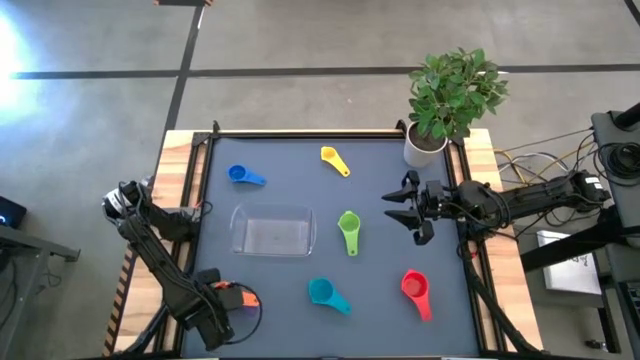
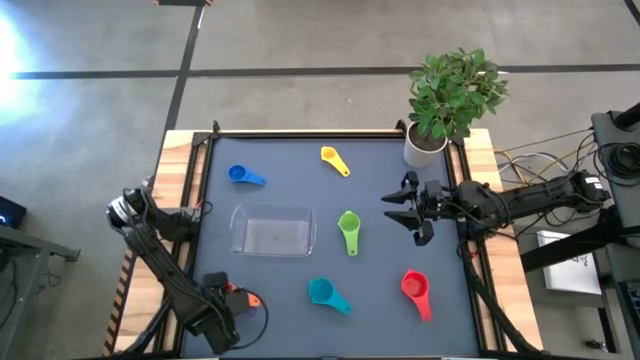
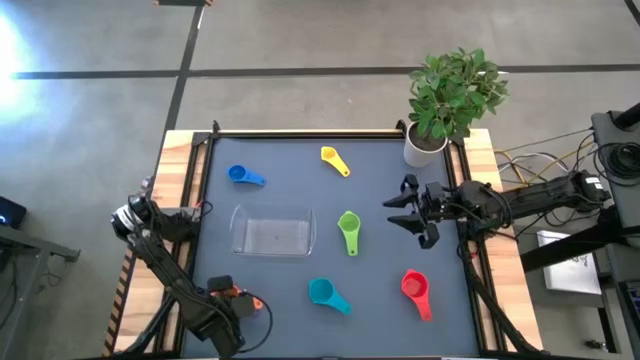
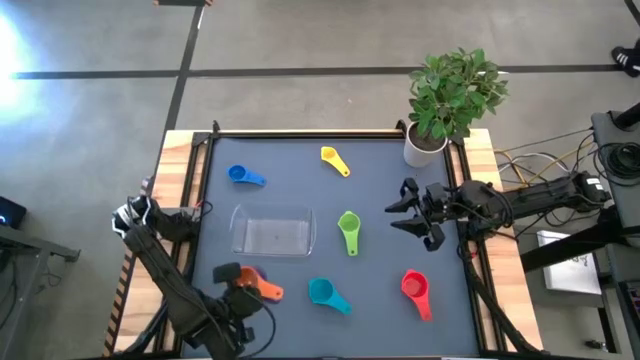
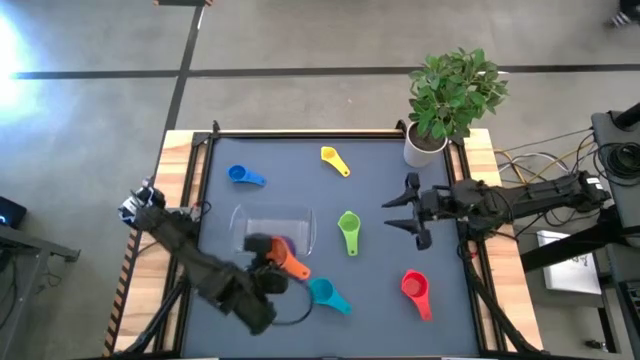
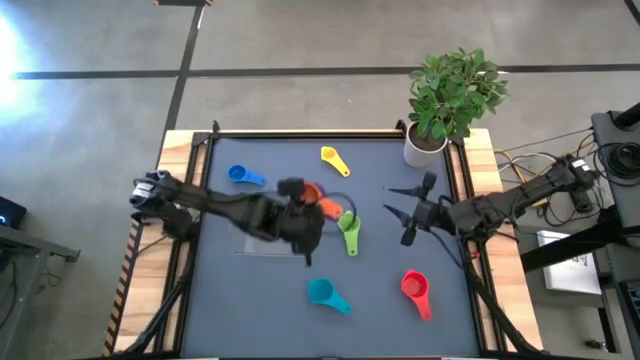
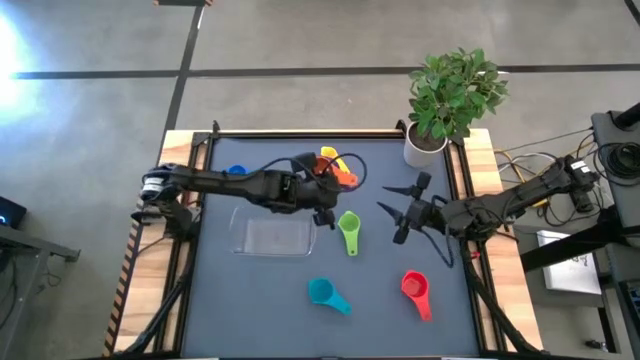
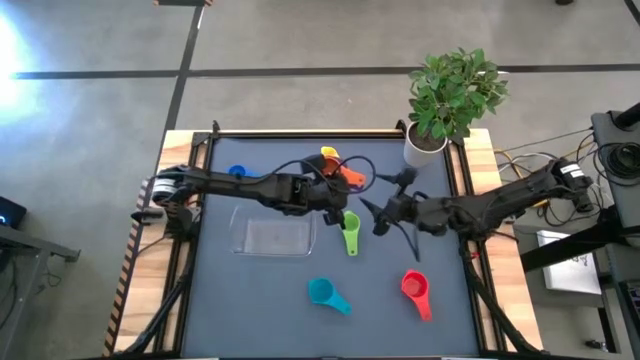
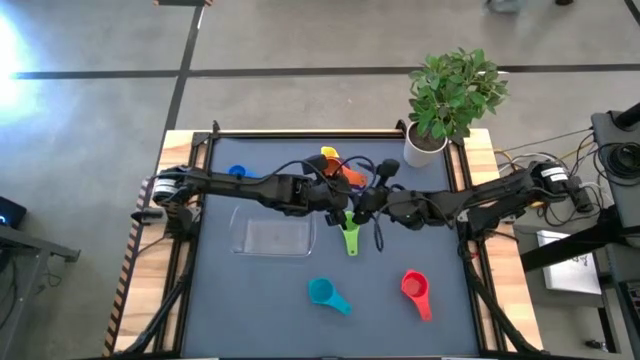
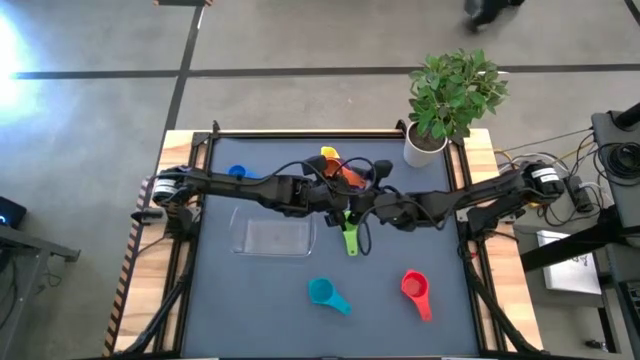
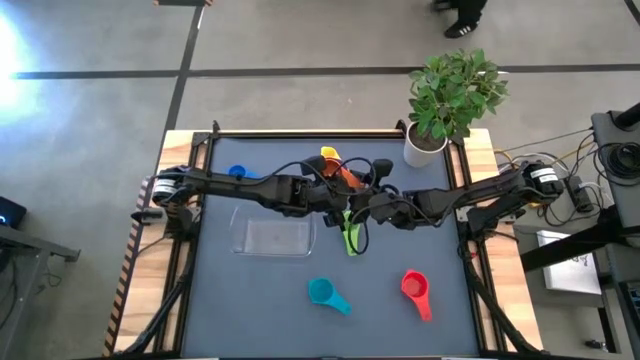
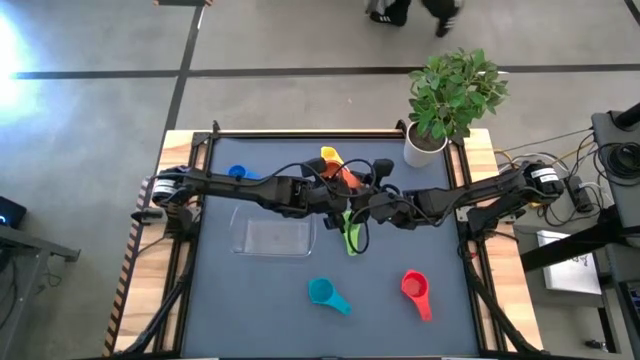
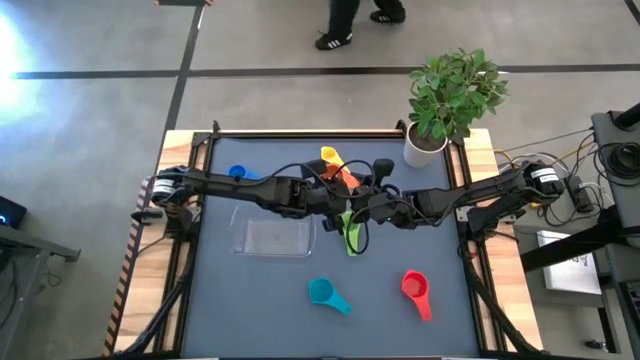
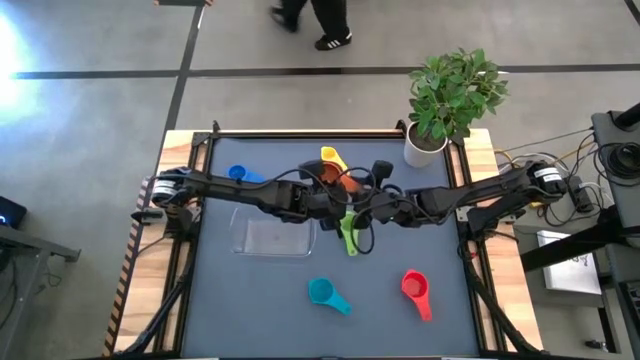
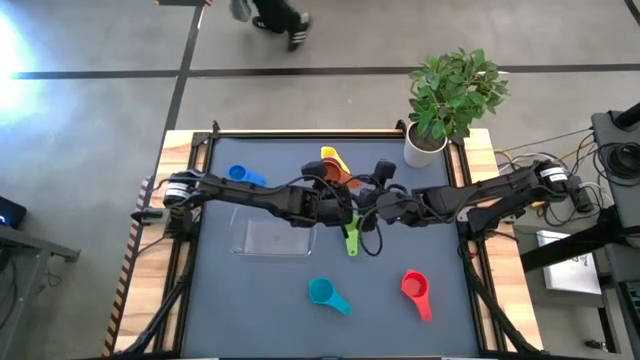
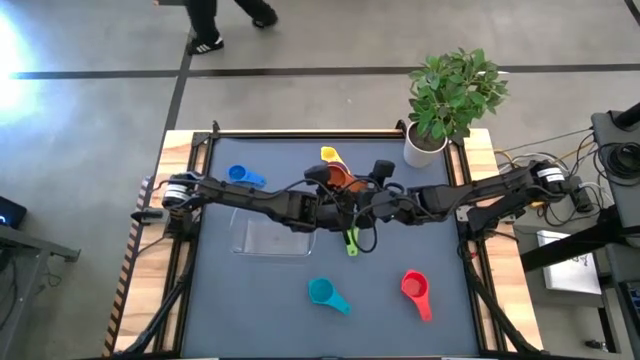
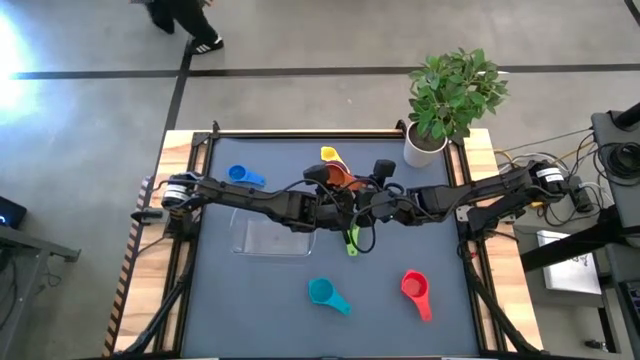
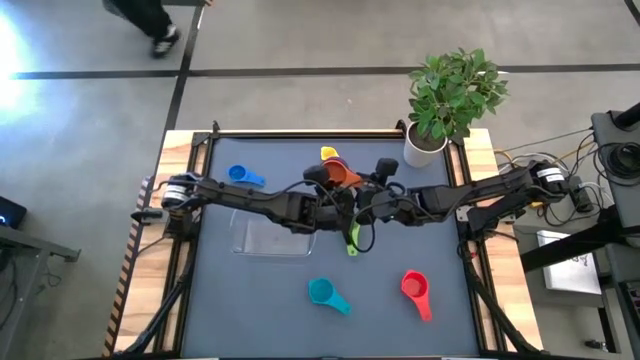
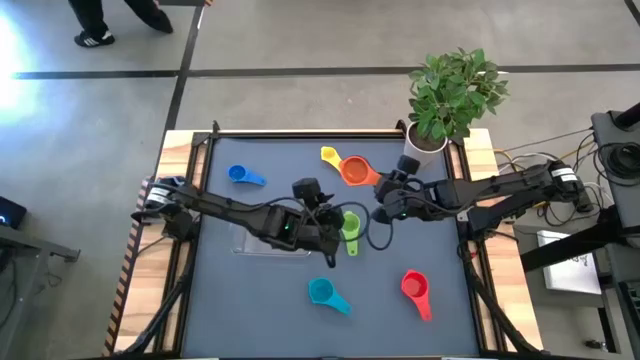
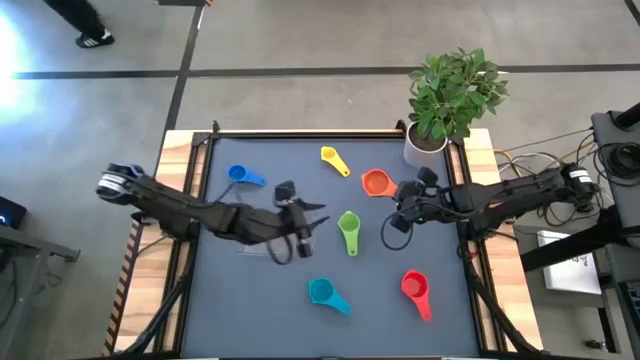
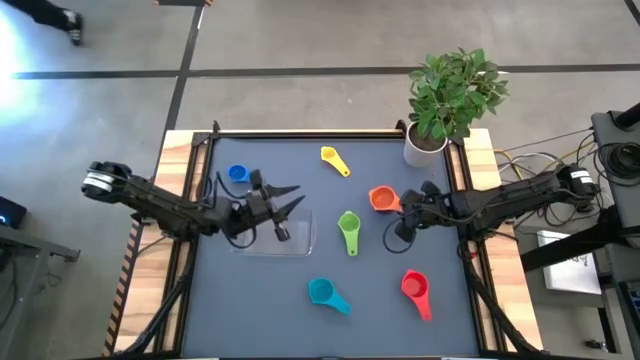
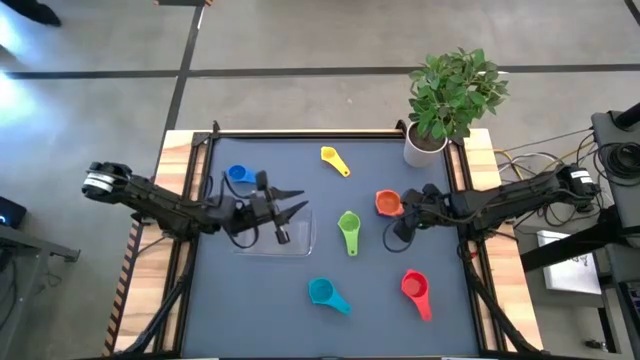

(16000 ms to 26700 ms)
Task: Nest measuring cups in basket
Prepare the stacked measuring cups

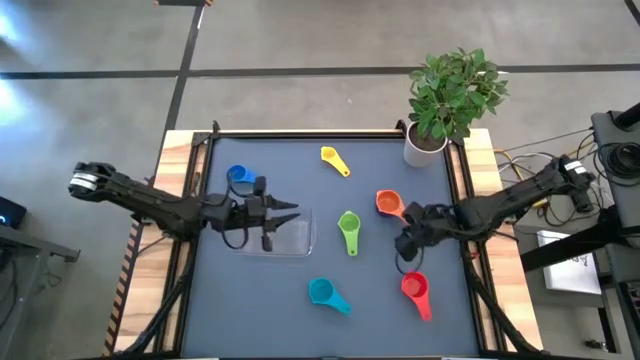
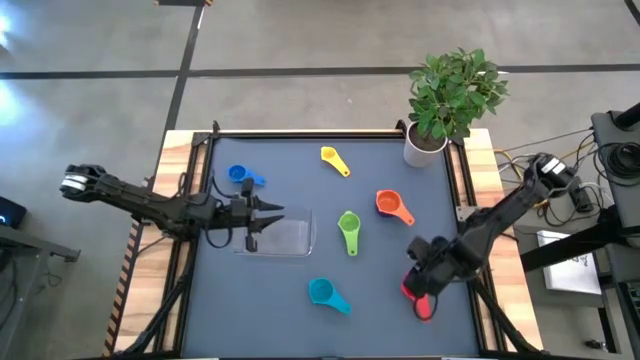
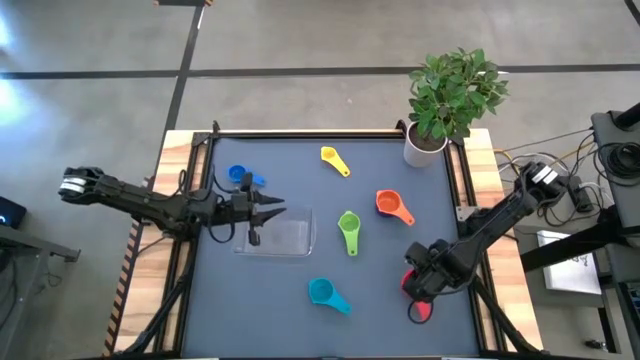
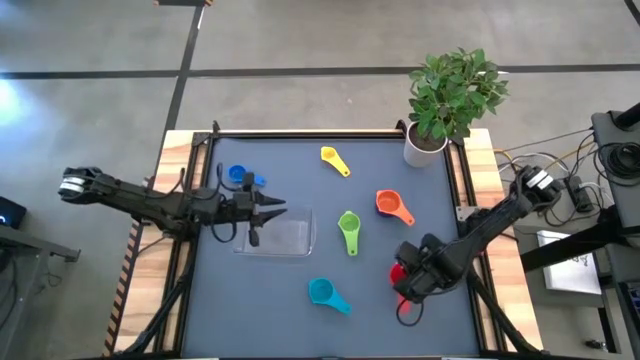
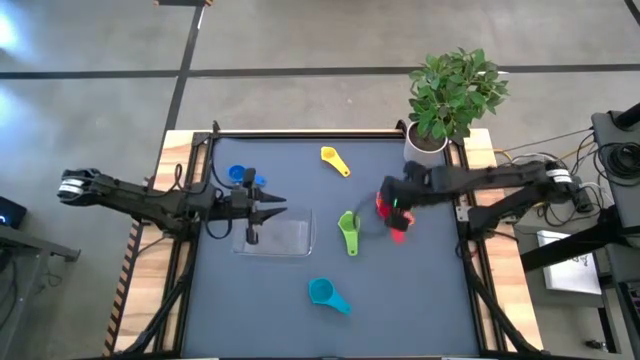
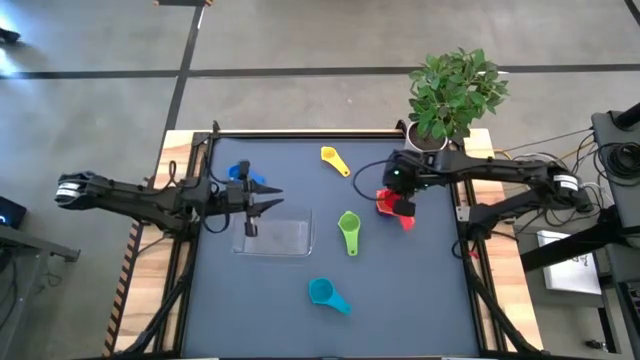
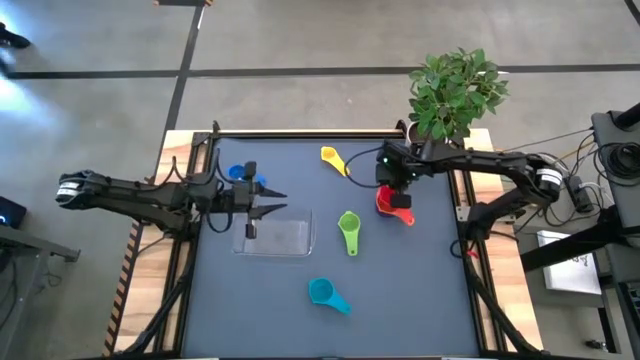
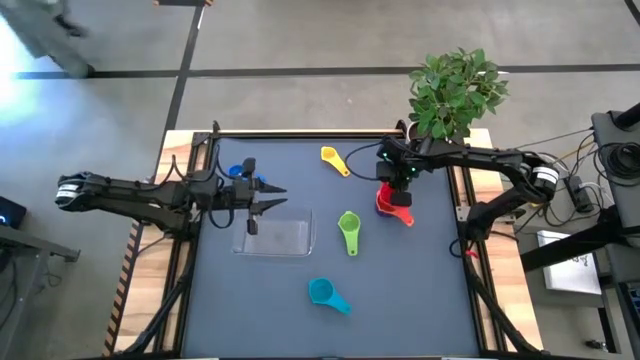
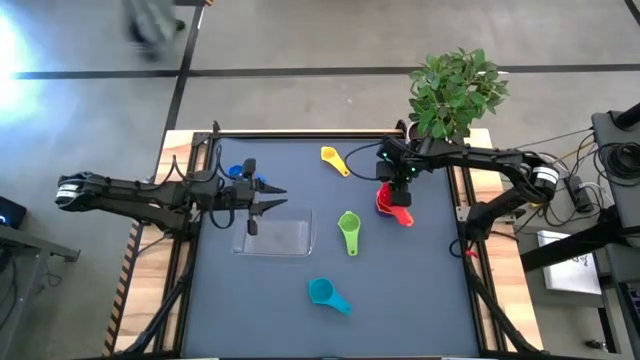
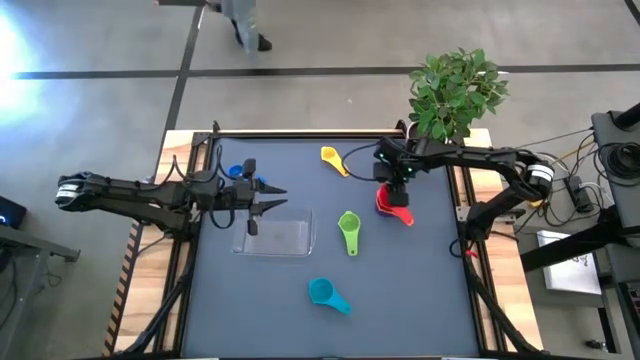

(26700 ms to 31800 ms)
Stack the red measuring cup on the top of the orange measuring cup

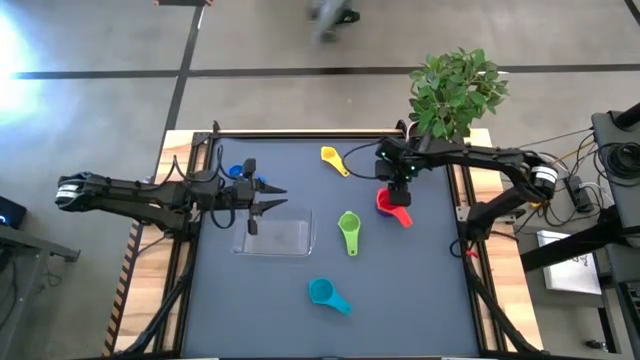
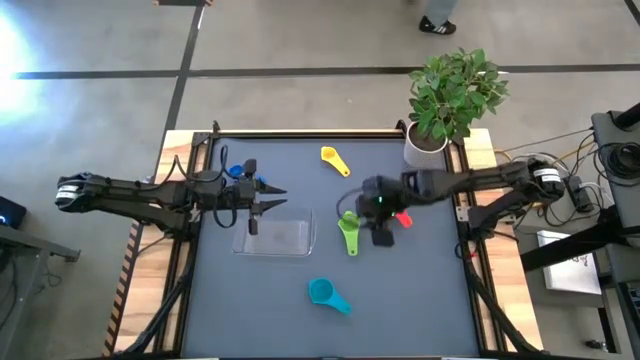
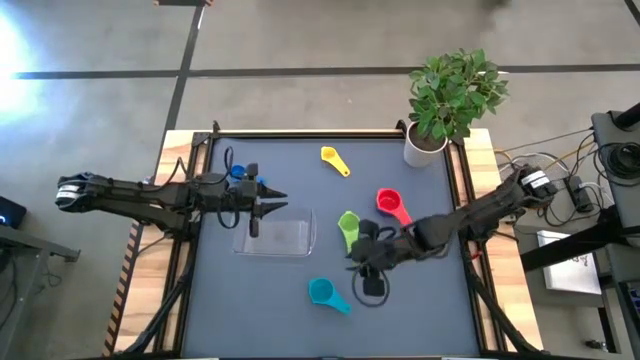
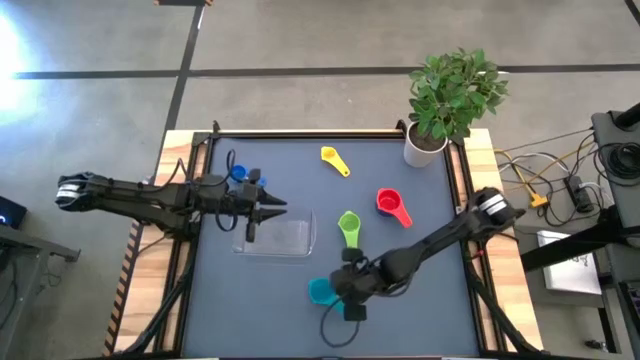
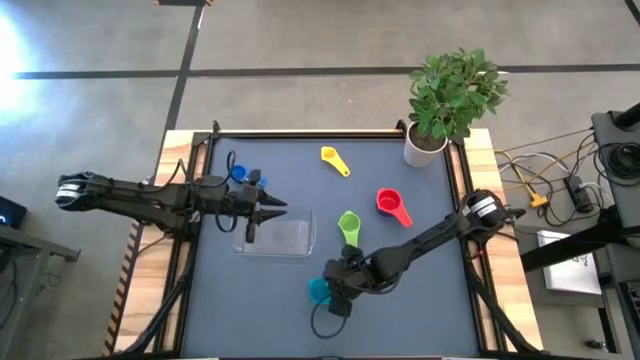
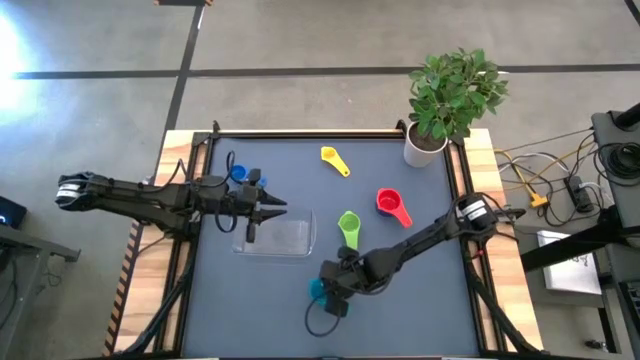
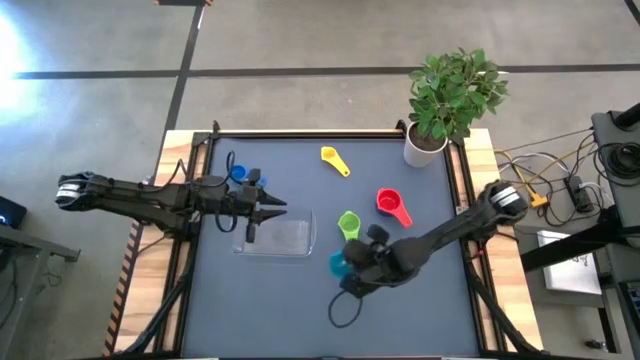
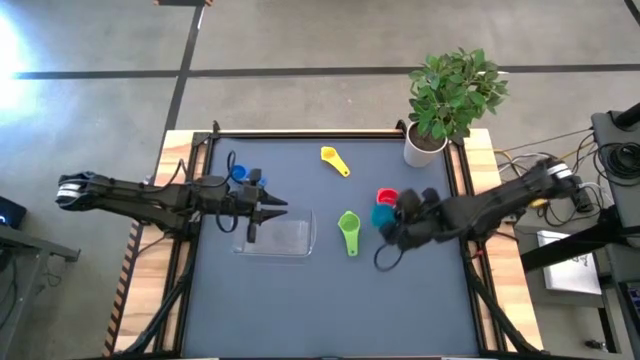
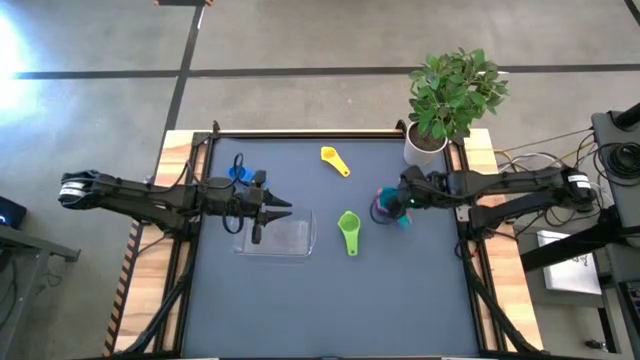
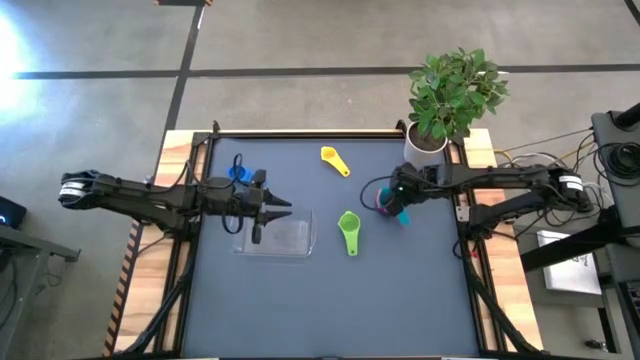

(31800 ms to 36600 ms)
Stack the light blue measuring cup on the top of the red measuring cup

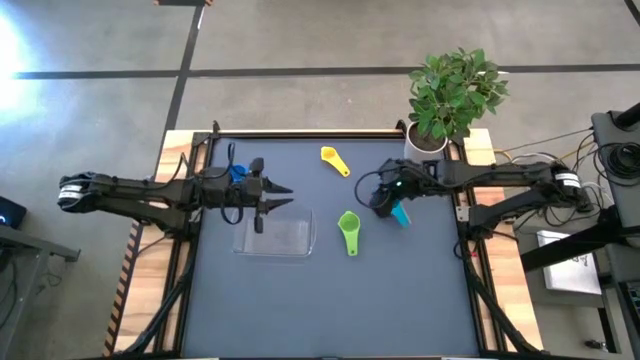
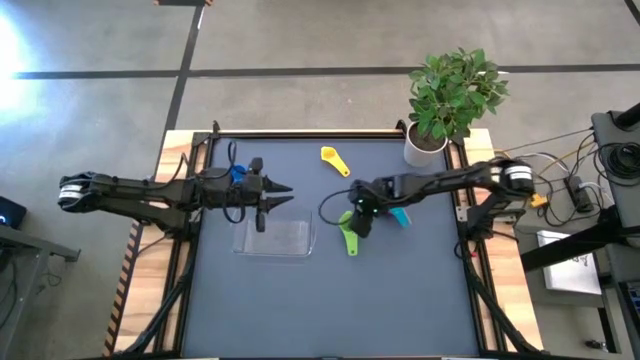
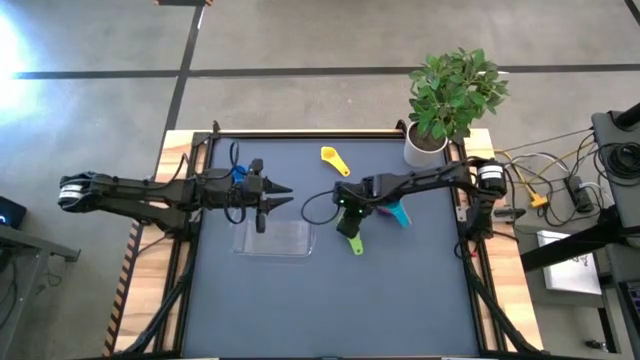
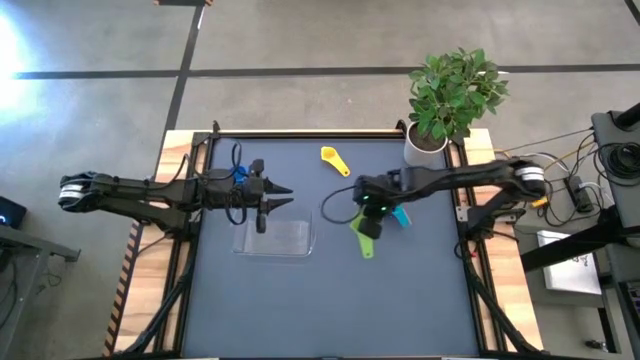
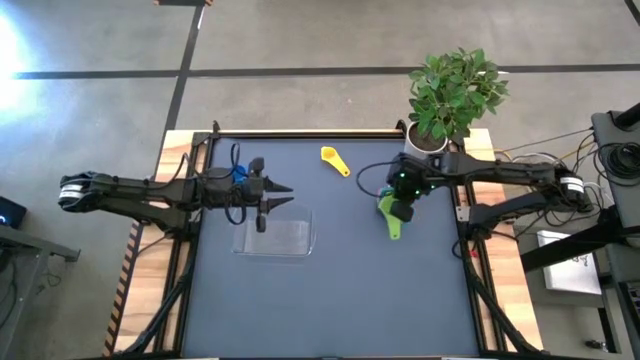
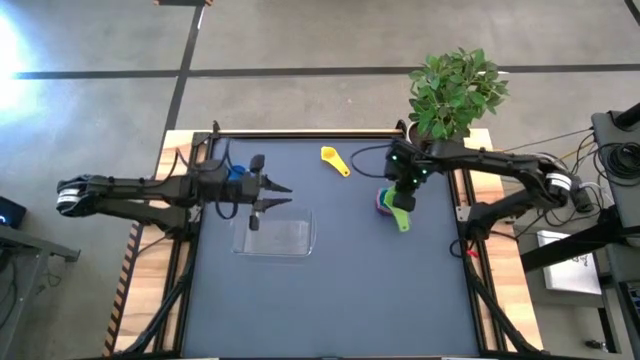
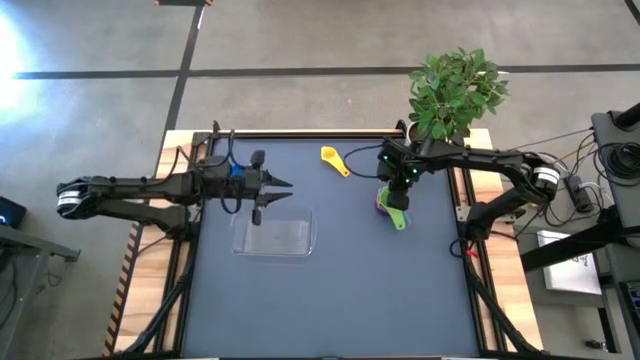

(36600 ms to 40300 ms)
Stack the green measuring cup on the top of the light blue measuring cup
